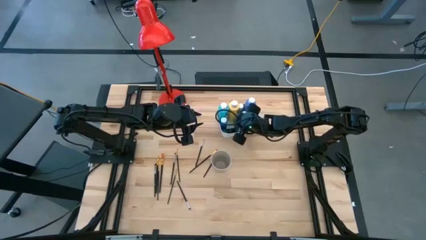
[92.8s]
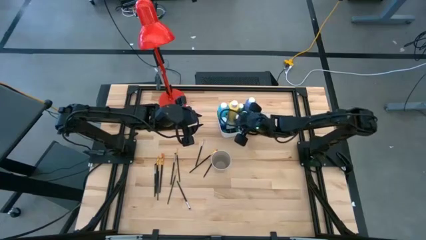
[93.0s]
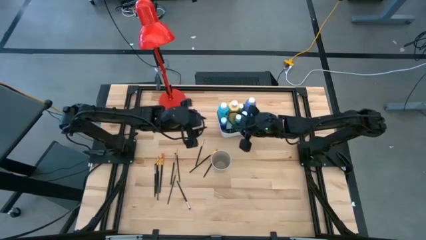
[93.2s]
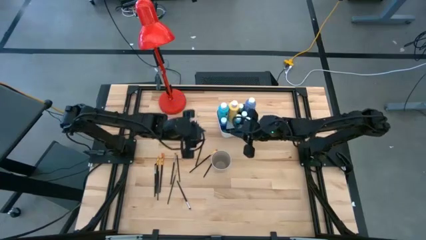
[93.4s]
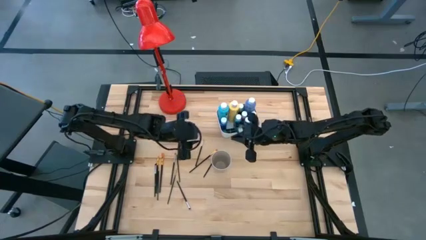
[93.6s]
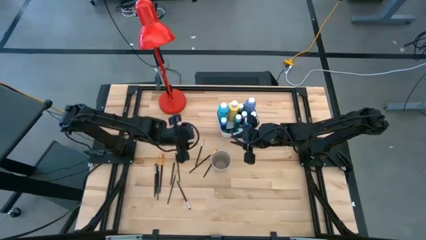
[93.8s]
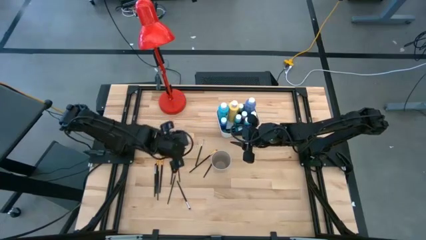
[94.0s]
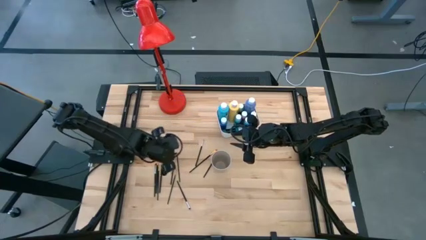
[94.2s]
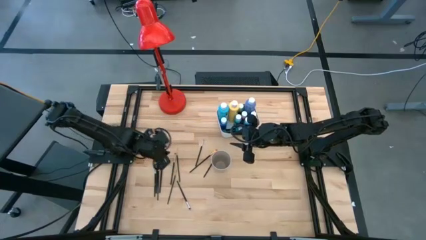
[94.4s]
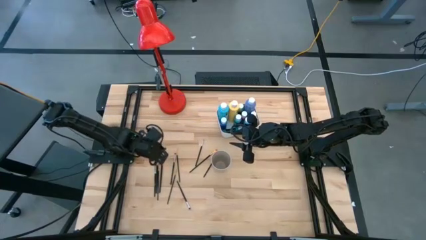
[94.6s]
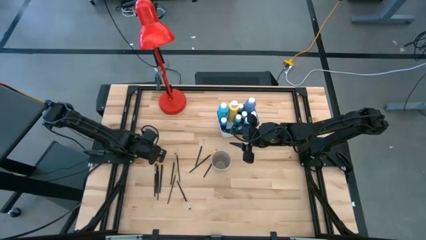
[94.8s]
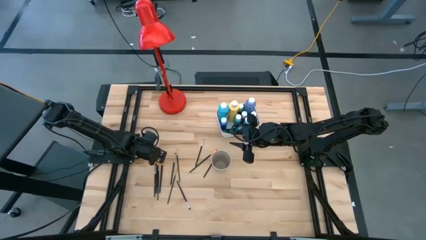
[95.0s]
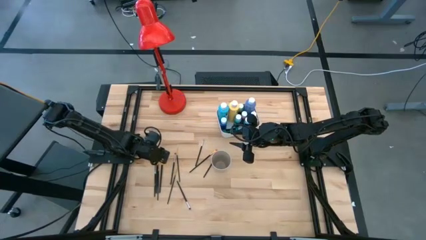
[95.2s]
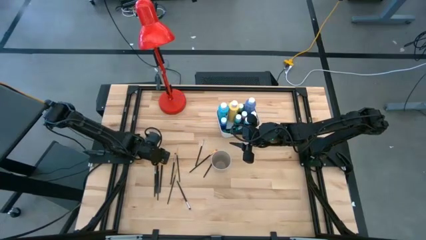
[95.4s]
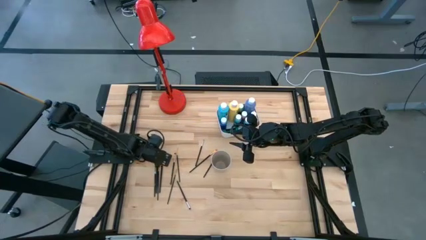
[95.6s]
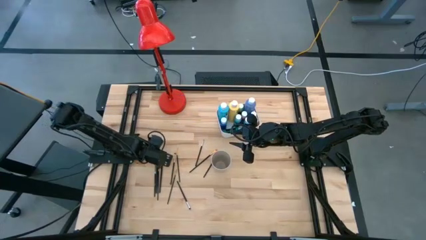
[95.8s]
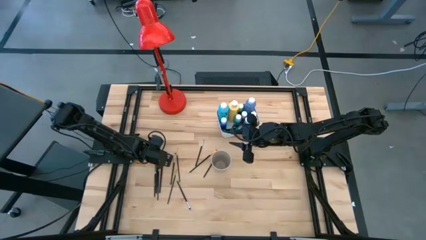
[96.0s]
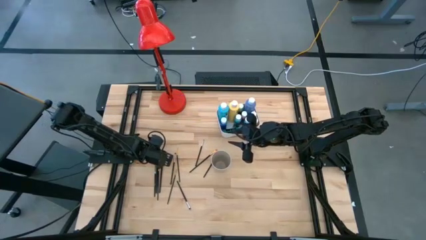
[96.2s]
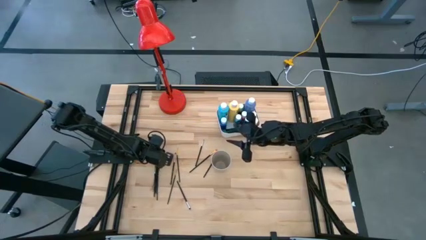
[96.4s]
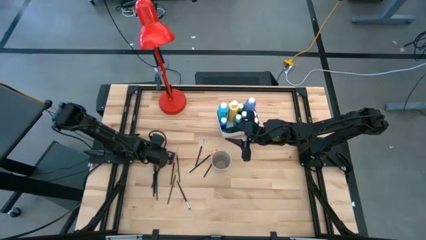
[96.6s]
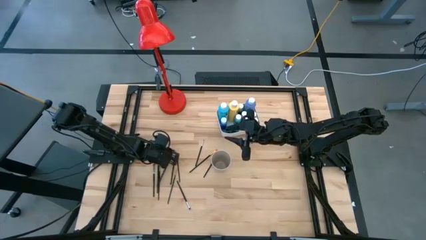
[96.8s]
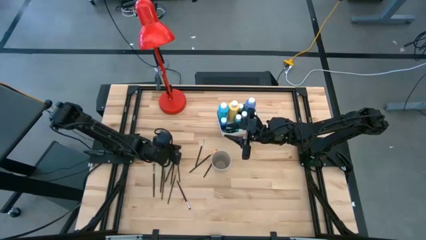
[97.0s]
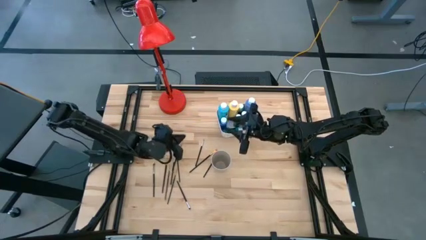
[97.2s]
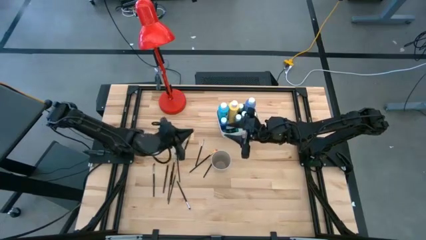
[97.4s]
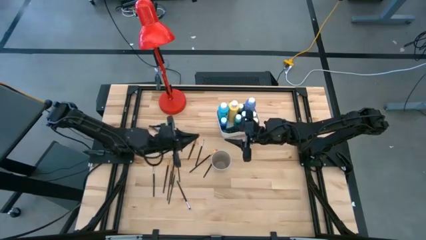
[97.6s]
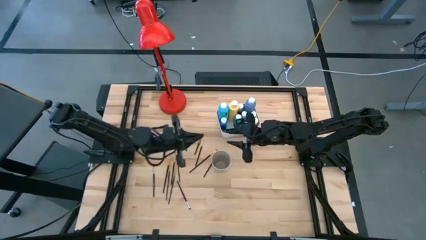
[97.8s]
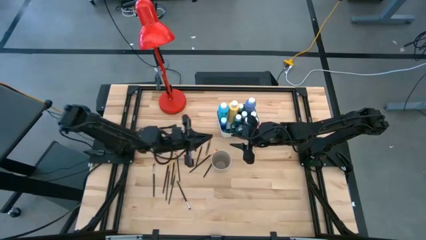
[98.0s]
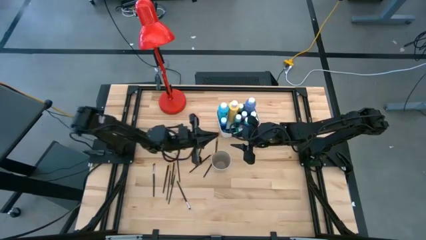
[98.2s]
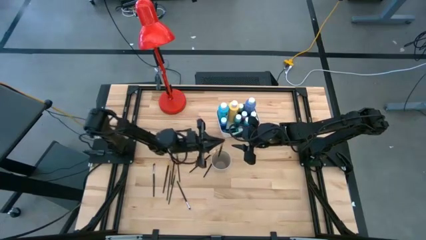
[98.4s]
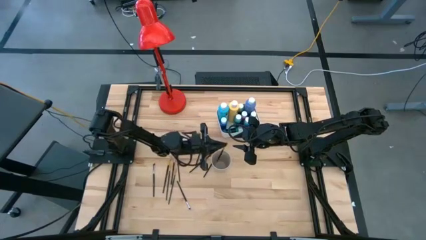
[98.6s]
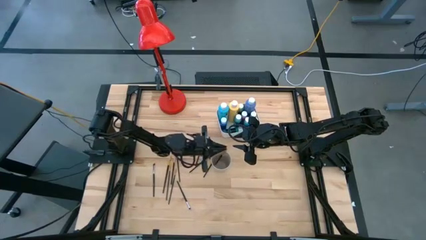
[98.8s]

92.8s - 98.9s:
Task: Pick & Place Paint Supplies
Put the gold paint brush into the white cup

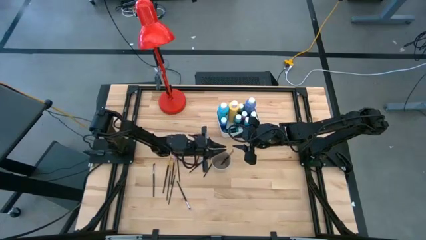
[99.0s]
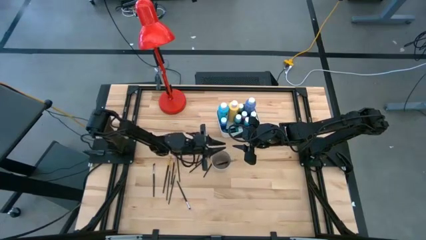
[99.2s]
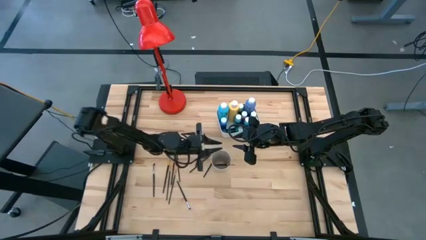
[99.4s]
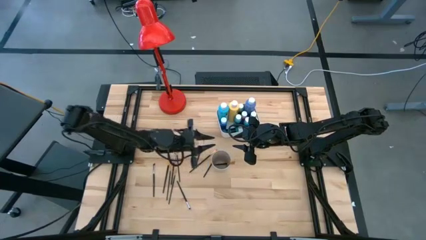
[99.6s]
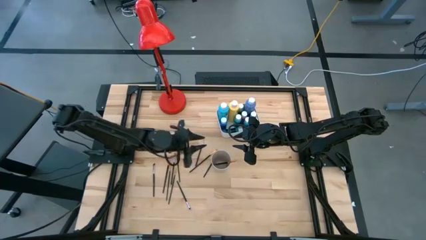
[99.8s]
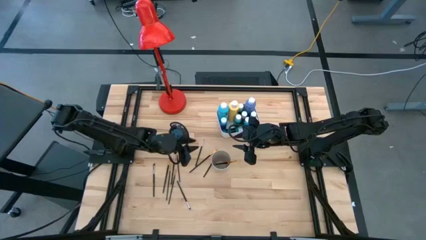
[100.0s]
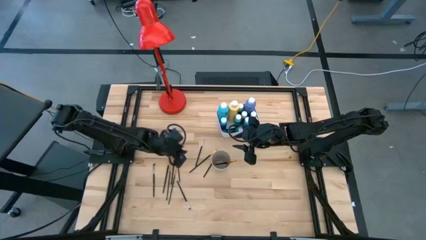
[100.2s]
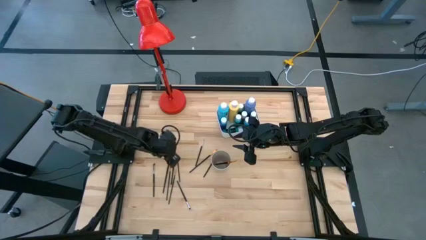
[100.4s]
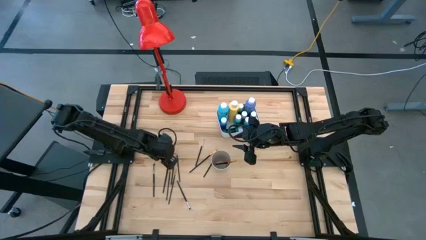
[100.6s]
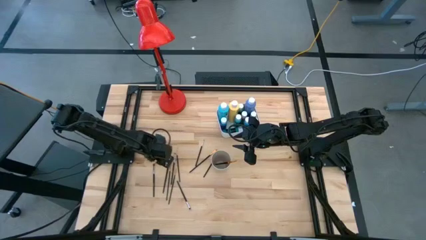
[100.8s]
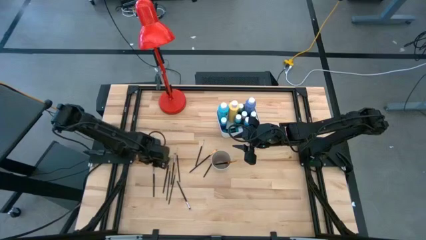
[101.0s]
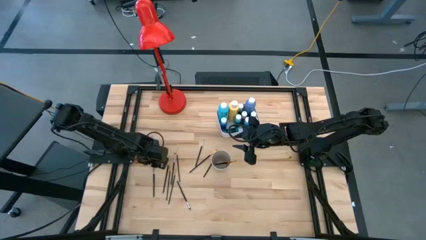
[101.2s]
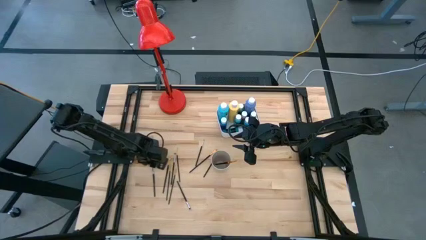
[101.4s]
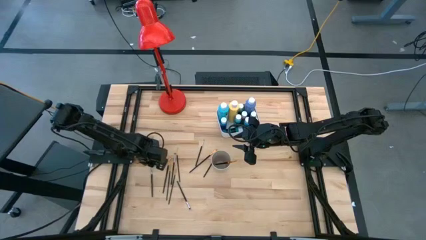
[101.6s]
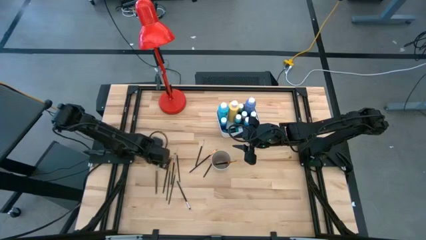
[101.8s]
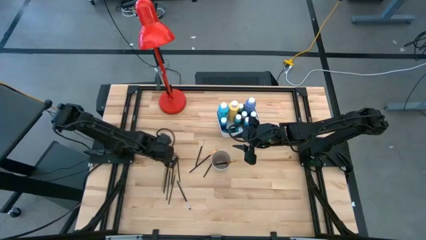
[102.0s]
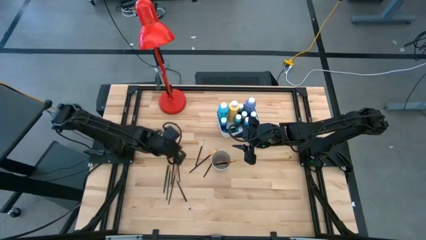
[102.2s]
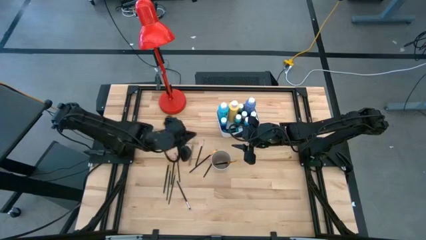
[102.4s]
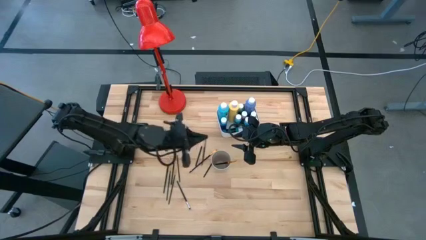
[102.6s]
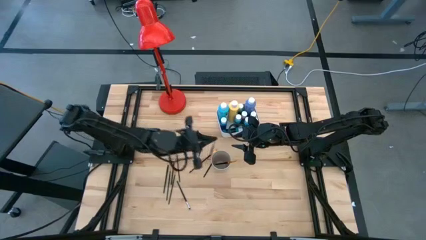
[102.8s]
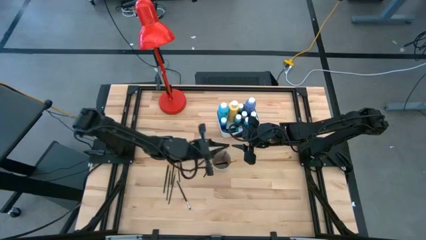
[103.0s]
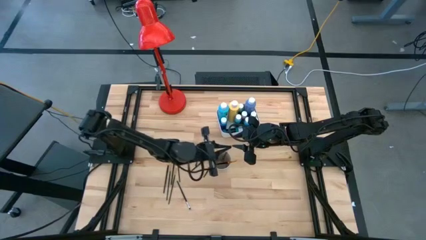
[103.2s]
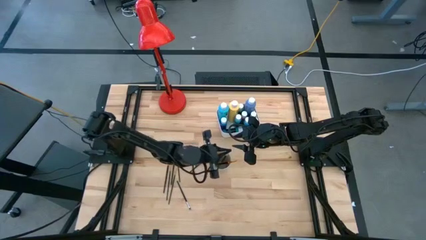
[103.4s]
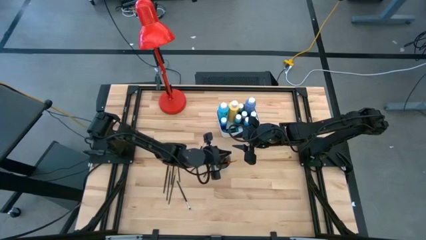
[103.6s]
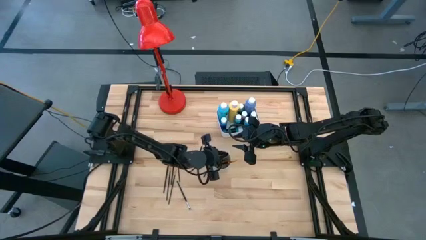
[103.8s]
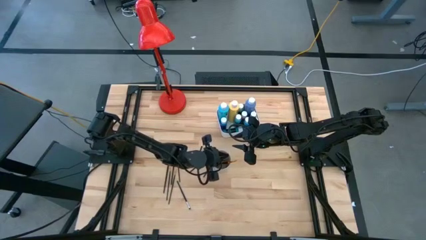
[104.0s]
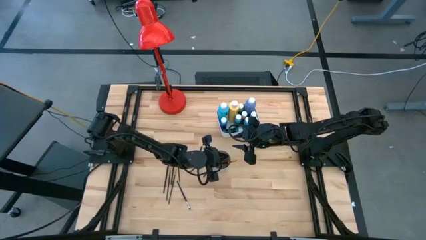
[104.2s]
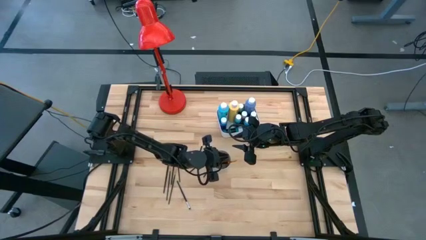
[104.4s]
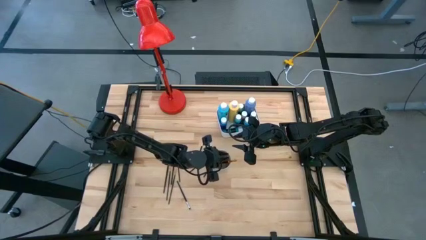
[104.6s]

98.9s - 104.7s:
Put the silver paint brush into the white cup

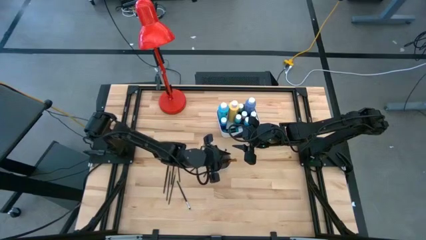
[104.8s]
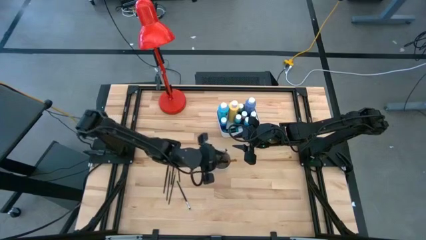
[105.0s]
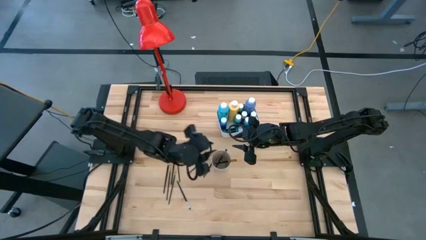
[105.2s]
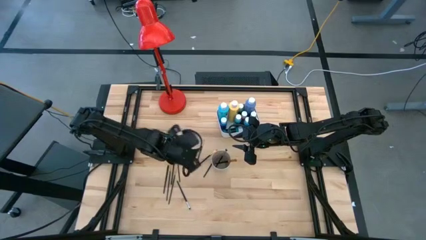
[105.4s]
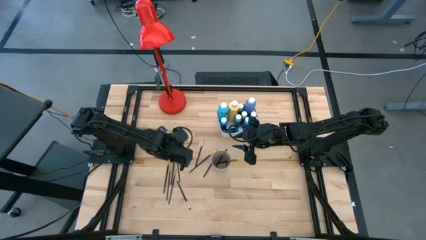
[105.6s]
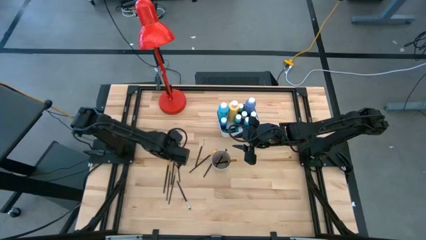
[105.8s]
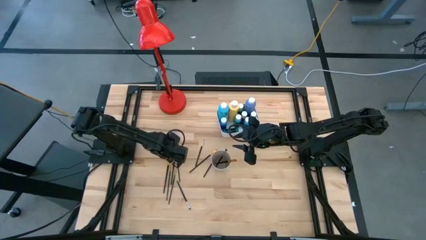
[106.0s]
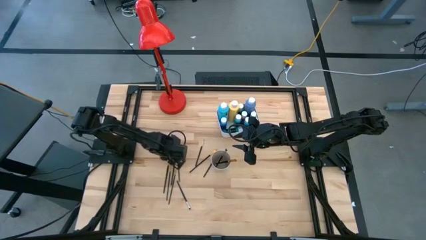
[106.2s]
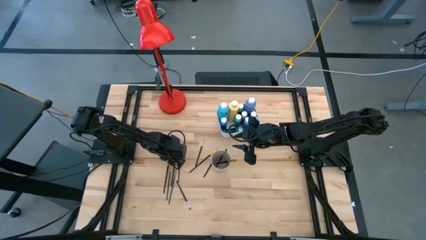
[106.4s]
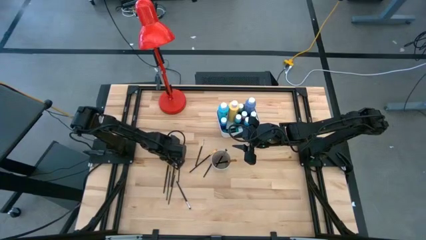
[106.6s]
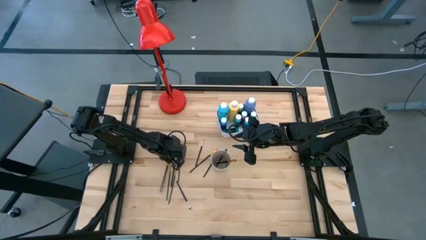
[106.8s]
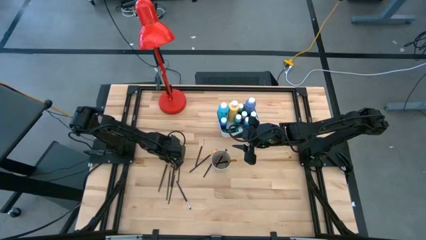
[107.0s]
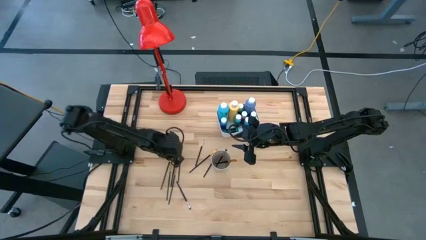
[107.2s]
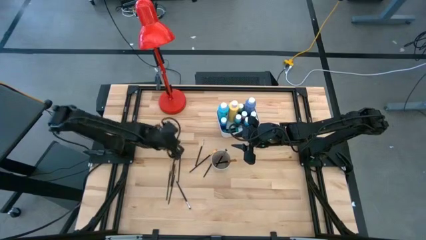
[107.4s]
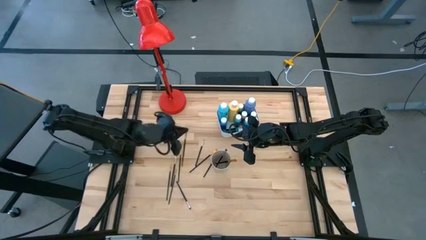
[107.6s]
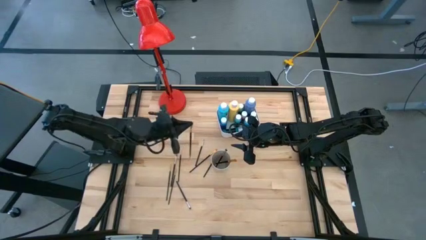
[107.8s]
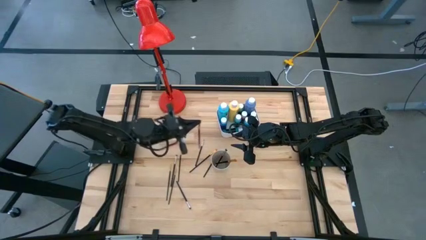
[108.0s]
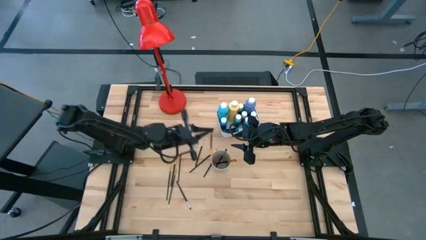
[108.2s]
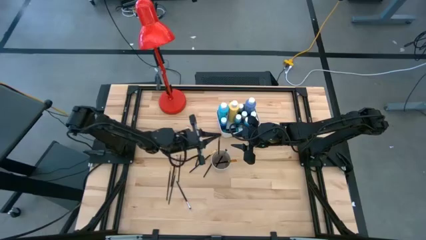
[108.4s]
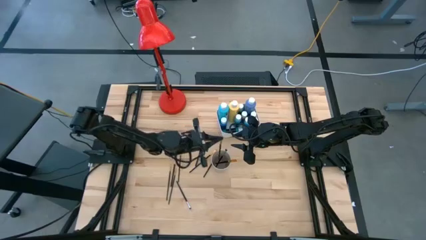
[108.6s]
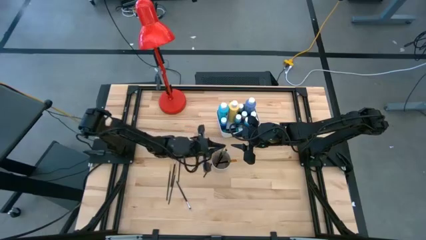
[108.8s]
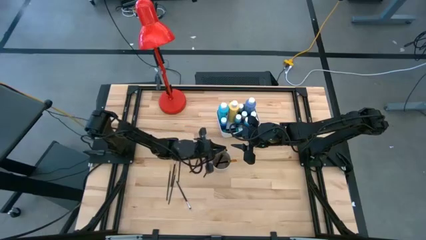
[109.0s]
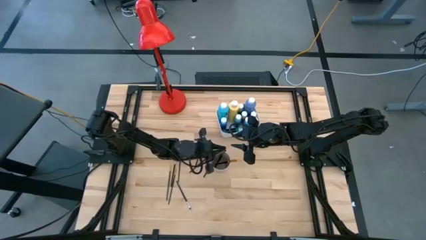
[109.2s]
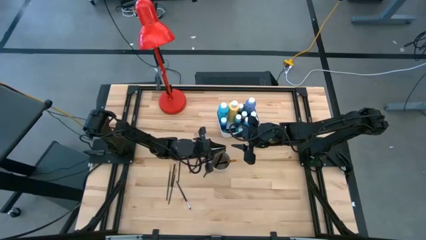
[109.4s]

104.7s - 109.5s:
Put the gold paint brush into the white cup
